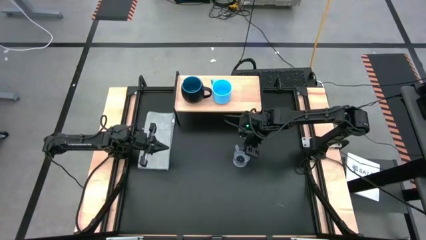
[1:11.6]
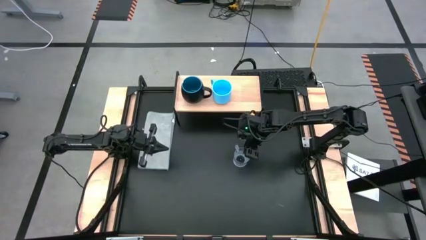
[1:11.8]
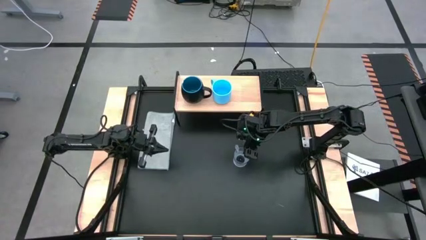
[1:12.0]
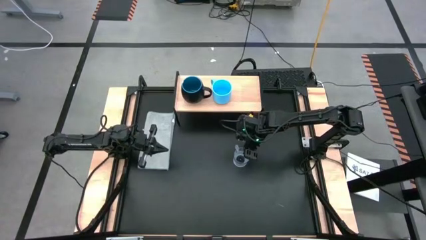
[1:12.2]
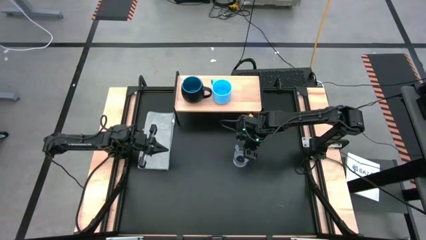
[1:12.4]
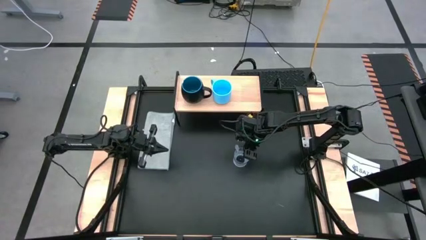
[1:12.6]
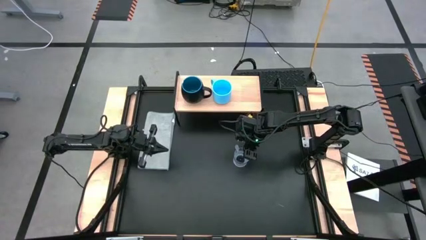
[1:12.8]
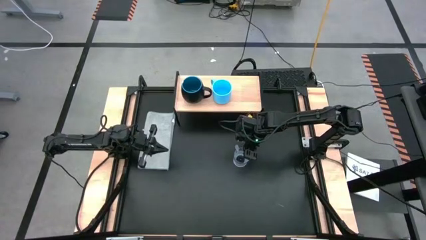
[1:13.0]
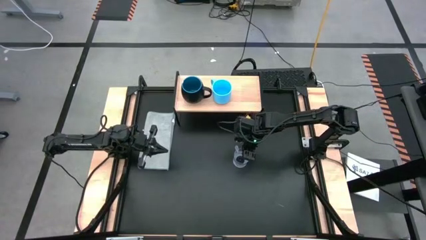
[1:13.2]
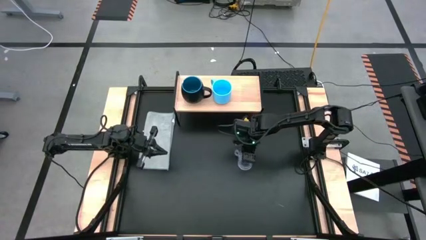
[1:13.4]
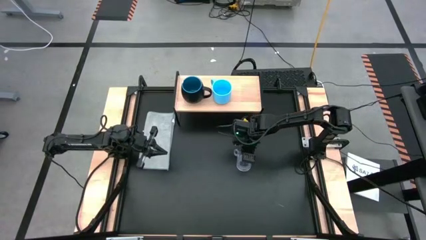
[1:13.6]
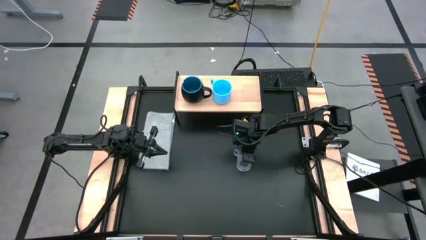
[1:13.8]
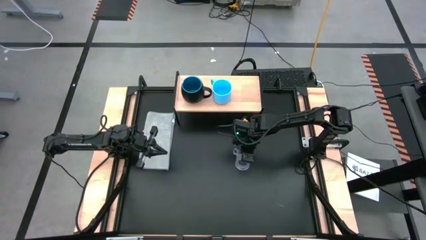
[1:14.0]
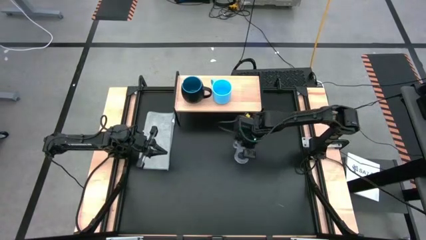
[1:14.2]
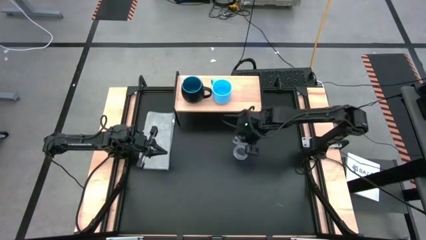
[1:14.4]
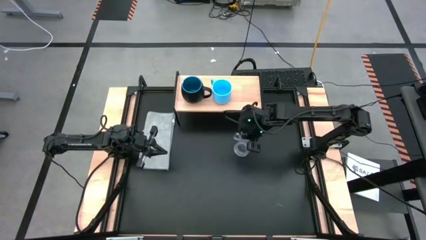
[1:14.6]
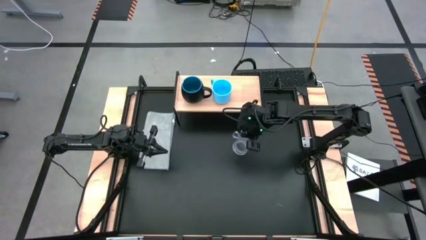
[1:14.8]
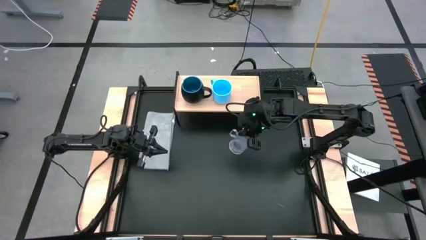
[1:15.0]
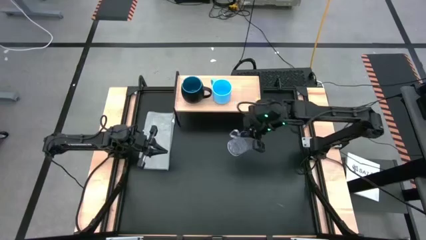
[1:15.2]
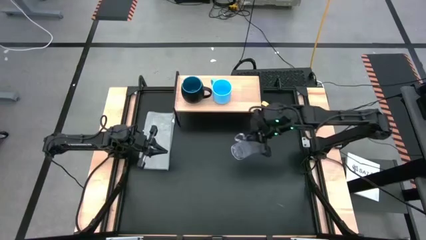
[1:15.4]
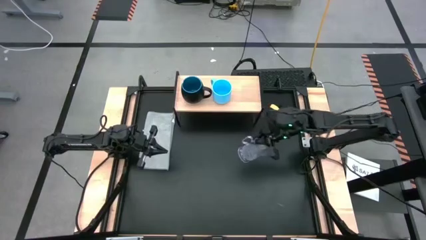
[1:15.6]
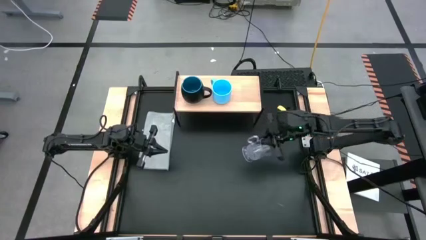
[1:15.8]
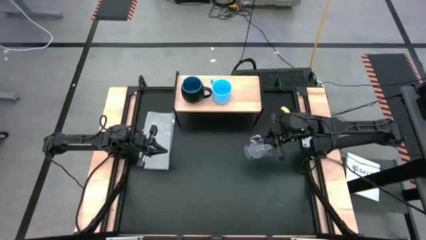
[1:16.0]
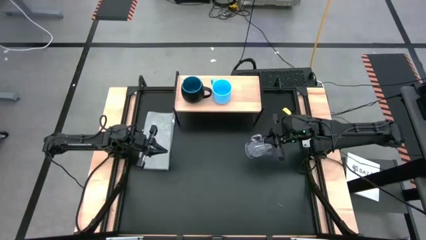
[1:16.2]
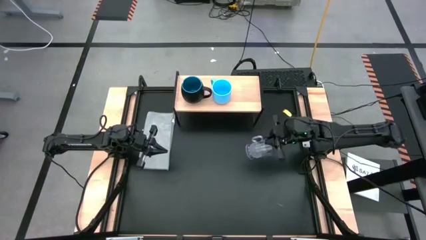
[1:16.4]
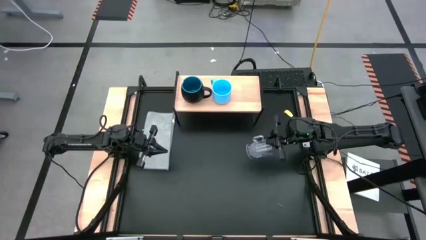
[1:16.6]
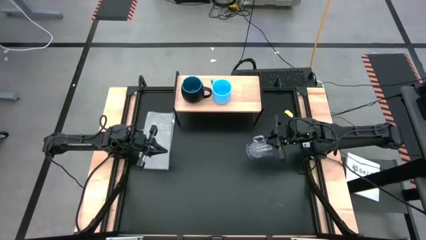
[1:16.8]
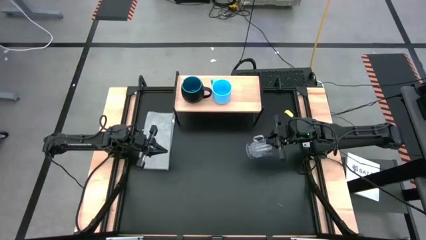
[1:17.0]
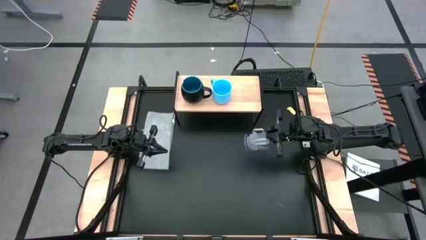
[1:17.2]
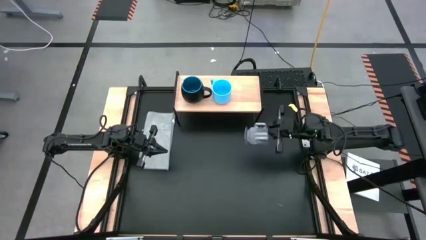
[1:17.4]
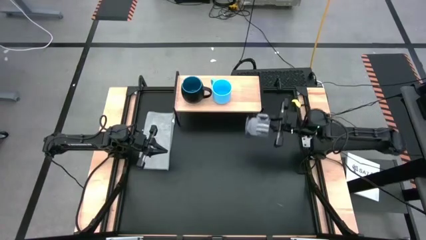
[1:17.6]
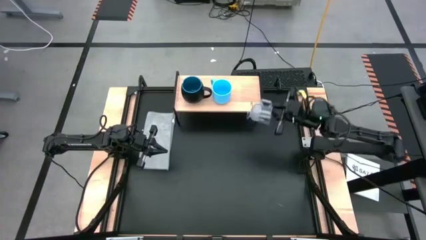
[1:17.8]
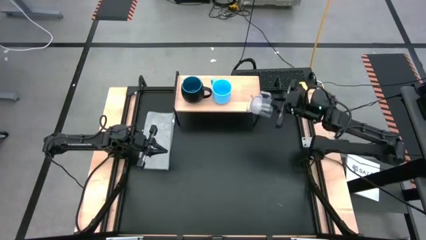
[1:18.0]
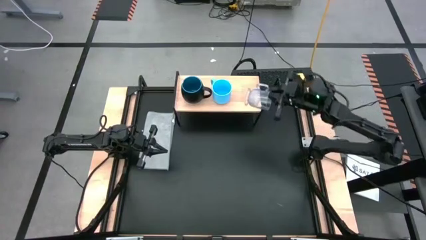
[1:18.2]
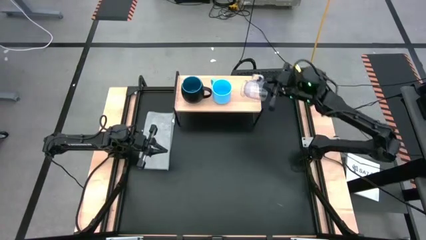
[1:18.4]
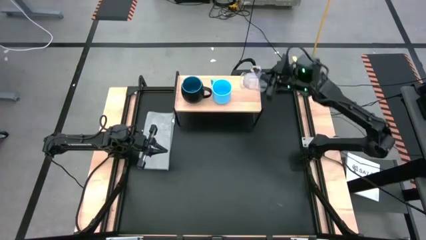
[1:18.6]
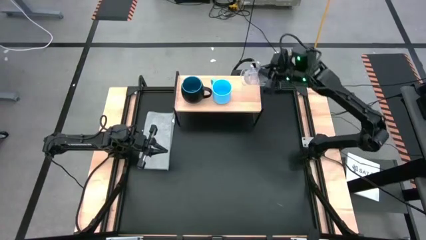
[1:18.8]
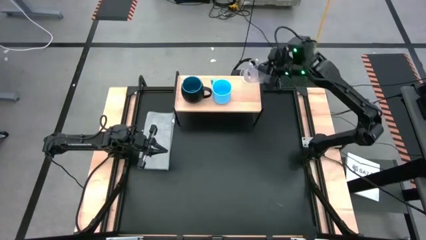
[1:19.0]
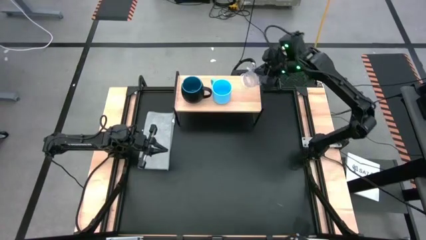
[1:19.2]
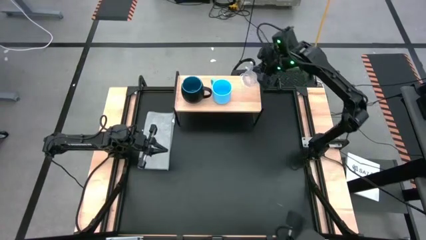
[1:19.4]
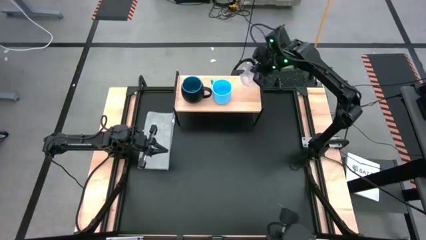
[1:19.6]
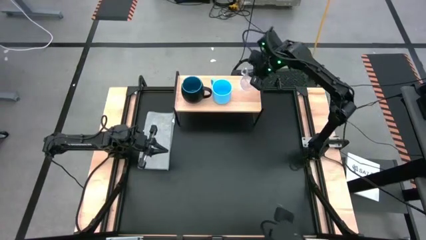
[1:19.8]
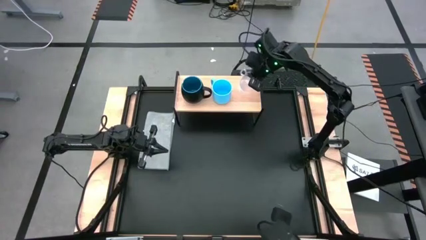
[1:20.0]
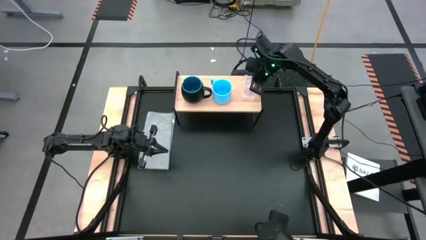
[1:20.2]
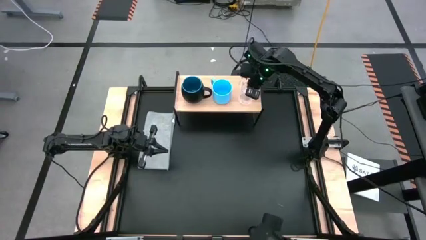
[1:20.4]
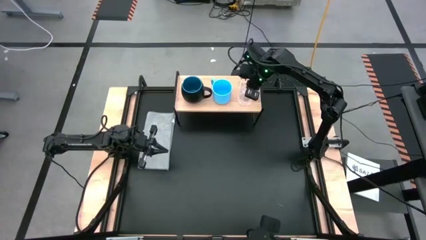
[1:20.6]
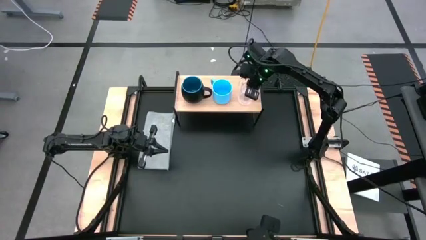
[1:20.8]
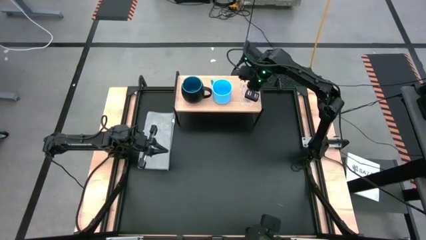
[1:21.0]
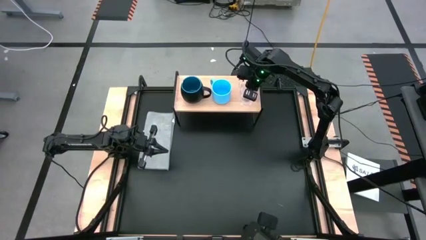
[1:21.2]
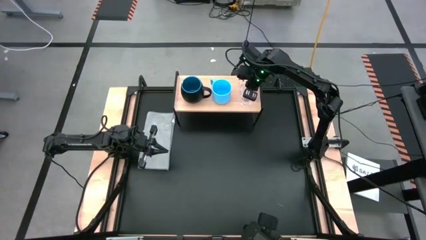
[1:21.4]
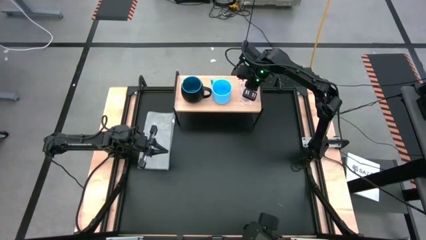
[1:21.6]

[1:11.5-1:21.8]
Task: Stack small to large cups/mugs on shelf
Put the transparent cup on the shelf

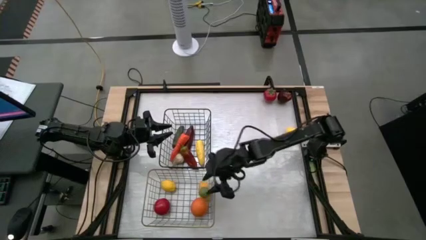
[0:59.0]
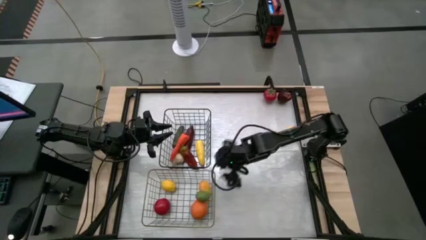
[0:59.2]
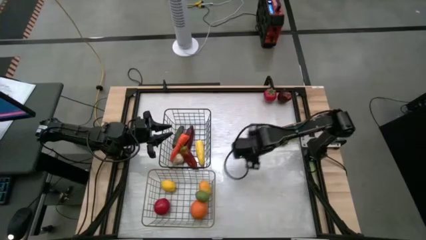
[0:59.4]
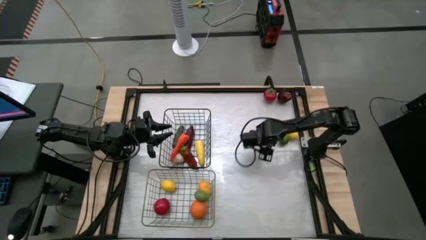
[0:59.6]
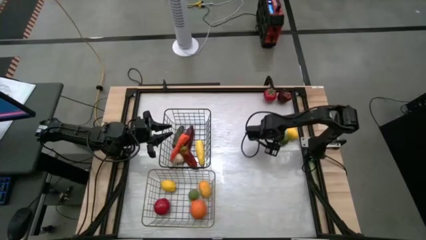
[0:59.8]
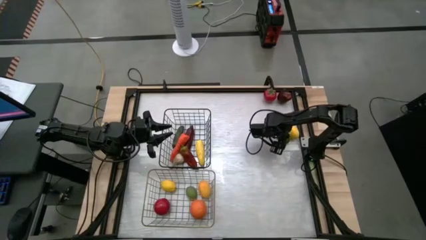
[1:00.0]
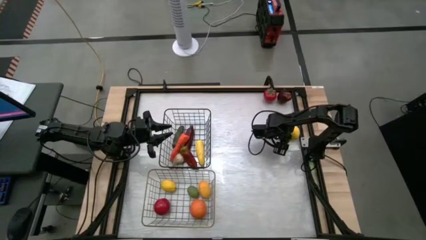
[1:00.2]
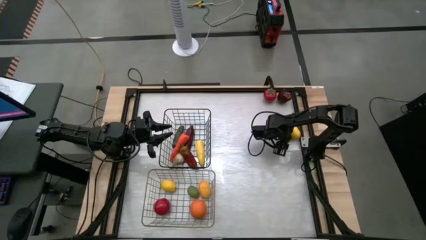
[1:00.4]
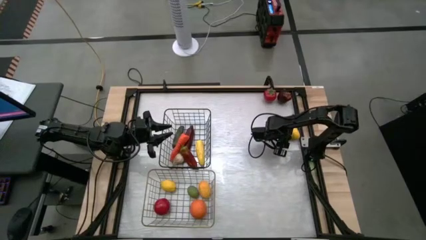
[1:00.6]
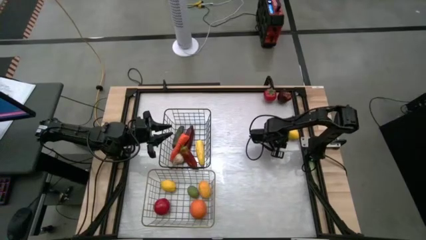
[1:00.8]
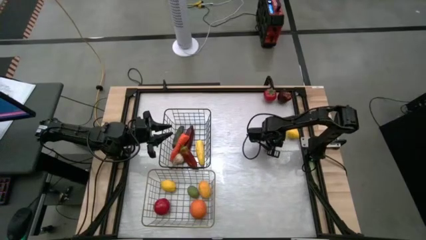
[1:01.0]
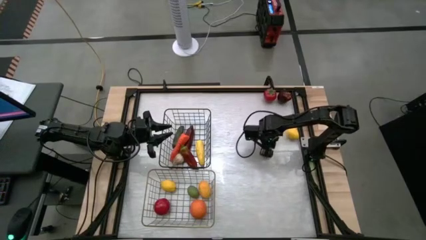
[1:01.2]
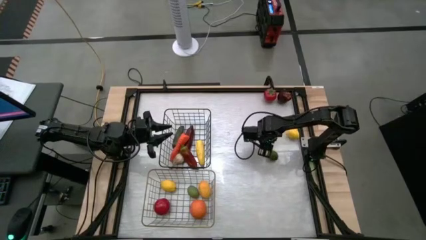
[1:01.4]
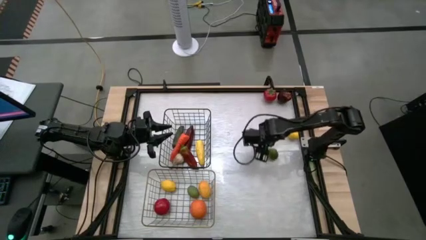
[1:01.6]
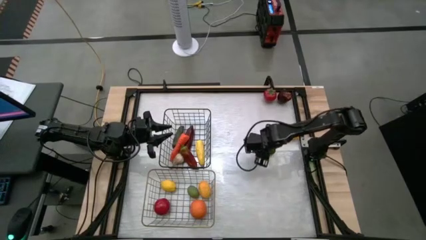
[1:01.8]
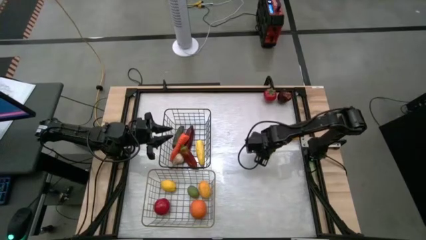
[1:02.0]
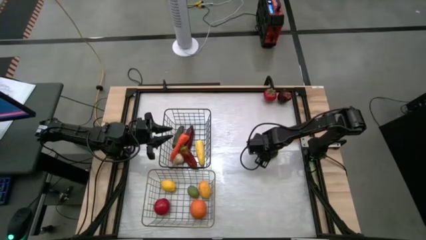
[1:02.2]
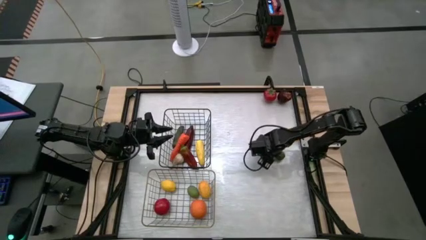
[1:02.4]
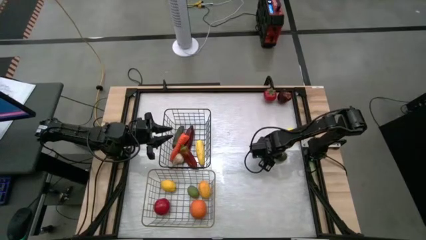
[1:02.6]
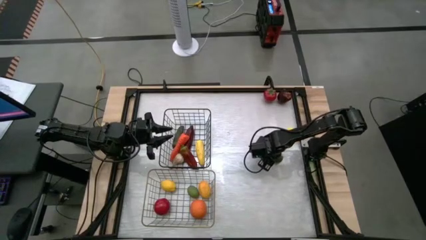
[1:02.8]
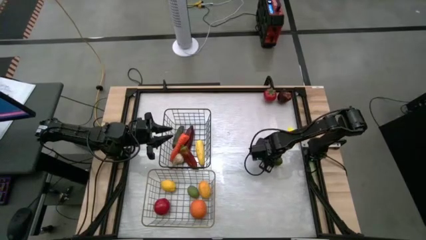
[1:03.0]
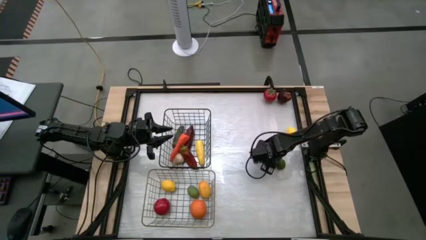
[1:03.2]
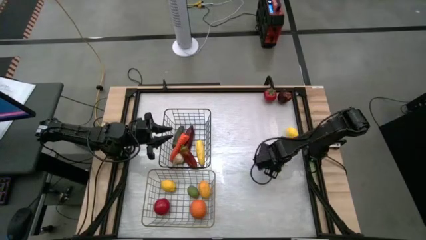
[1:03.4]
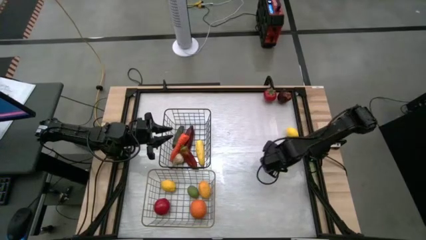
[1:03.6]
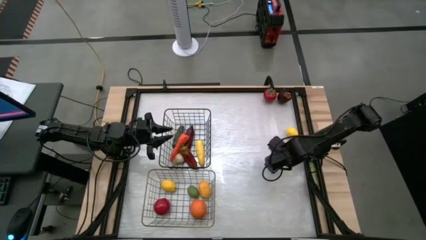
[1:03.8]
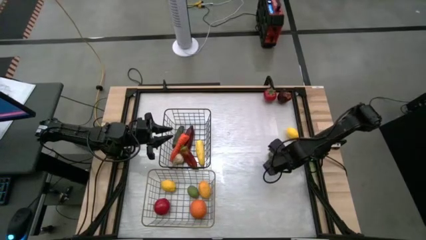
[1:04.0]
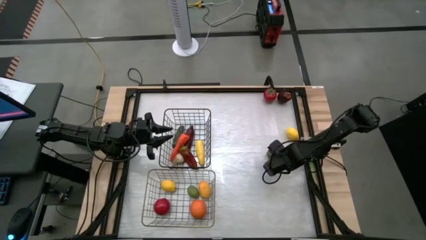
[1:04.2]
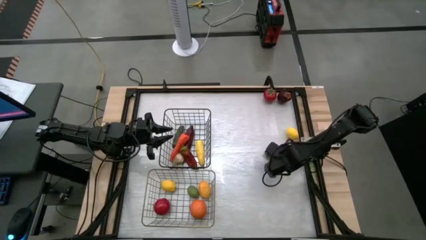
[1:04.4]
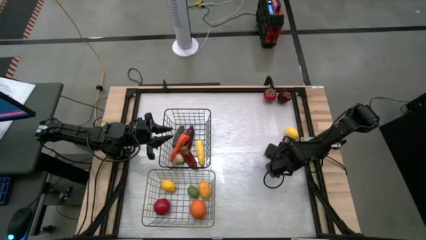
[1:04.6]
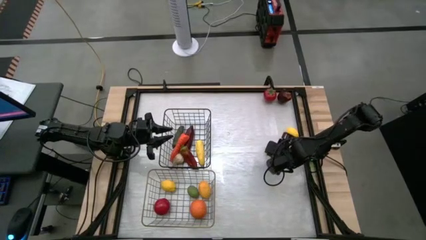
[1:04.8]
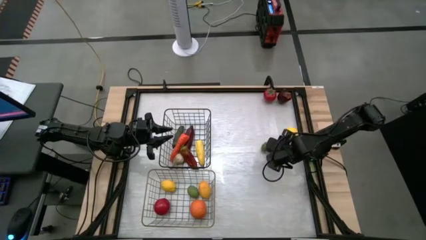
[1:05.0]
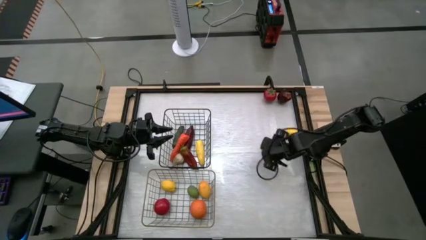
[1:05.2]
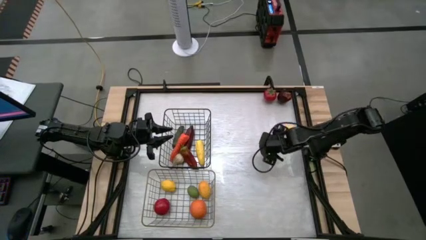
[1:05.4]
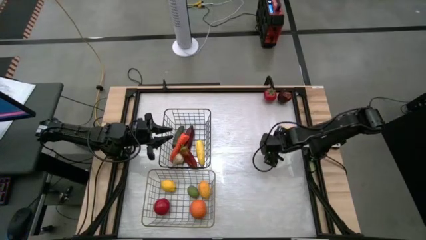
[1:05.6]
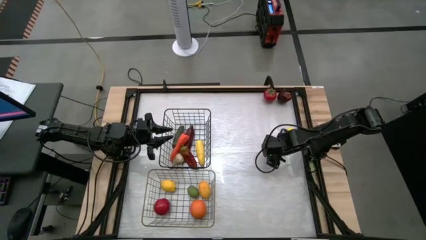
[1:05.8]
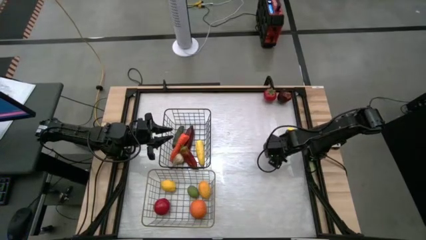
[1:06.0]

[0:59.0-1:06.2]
Task: Sort produce into baskets
Put the lime into the silver wire basket
